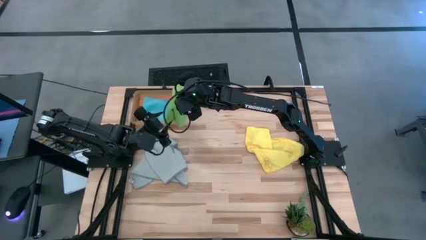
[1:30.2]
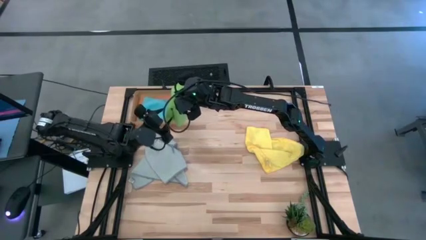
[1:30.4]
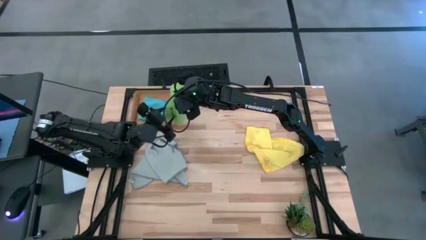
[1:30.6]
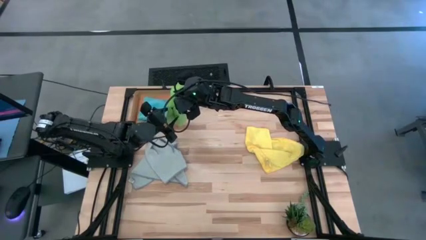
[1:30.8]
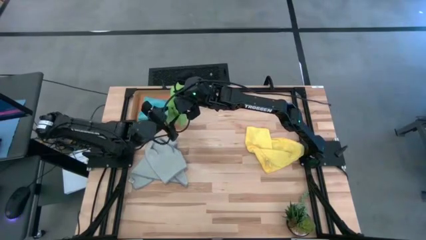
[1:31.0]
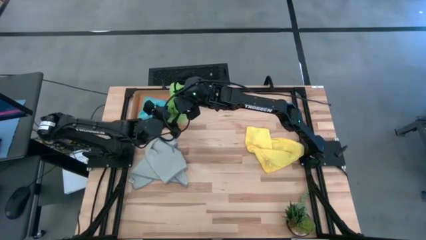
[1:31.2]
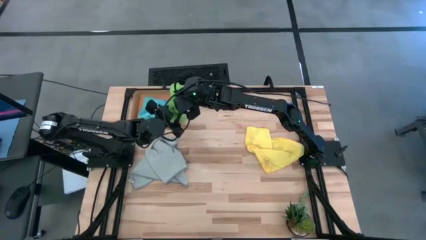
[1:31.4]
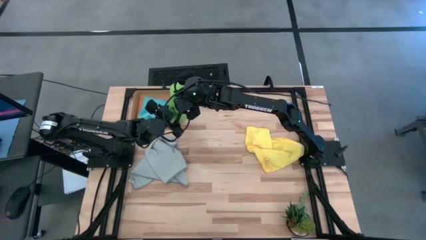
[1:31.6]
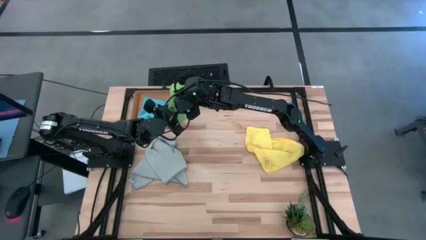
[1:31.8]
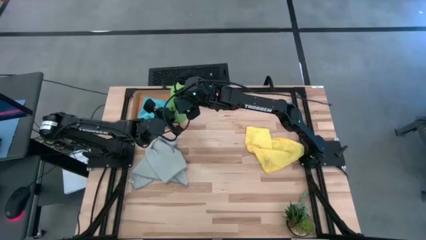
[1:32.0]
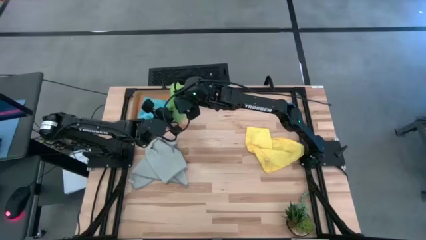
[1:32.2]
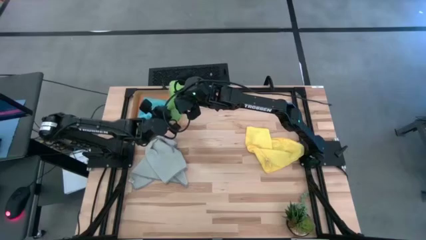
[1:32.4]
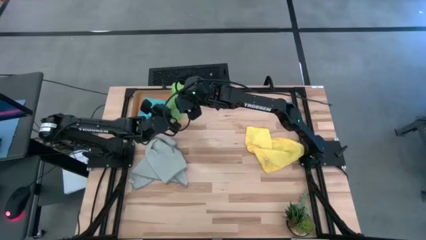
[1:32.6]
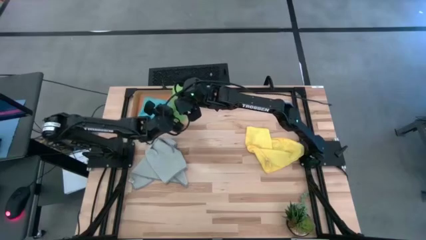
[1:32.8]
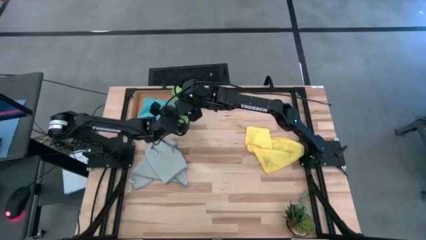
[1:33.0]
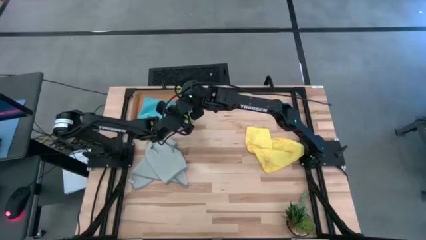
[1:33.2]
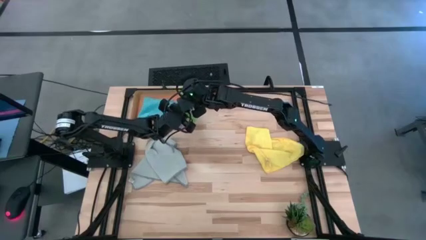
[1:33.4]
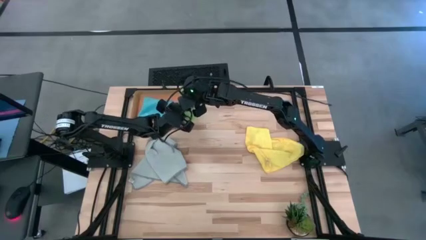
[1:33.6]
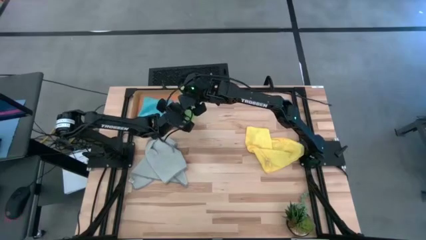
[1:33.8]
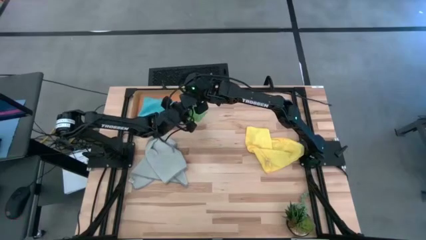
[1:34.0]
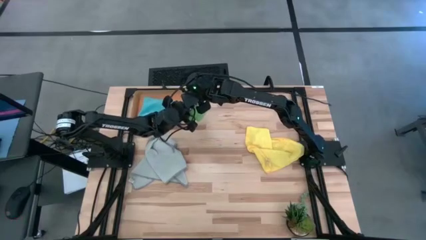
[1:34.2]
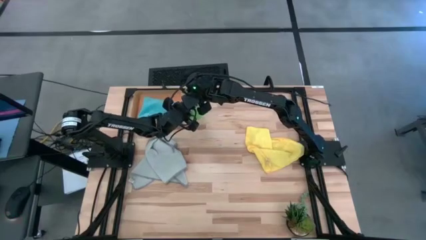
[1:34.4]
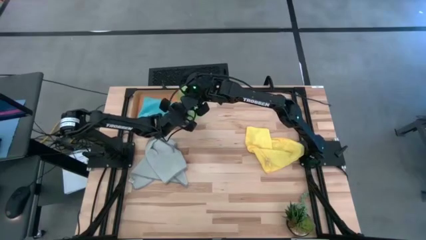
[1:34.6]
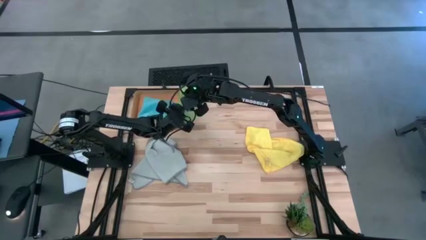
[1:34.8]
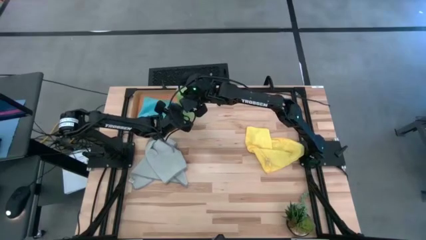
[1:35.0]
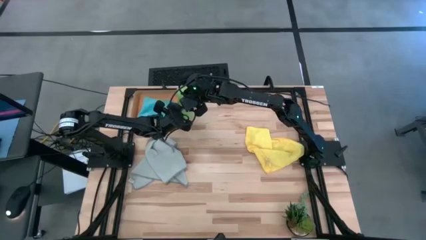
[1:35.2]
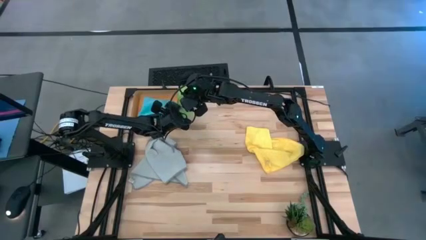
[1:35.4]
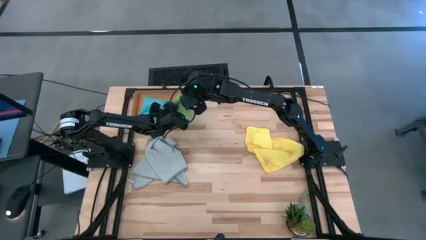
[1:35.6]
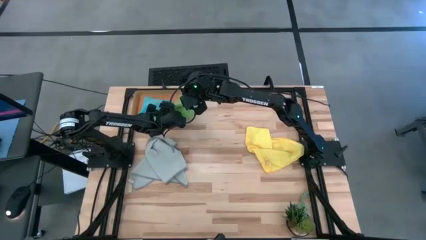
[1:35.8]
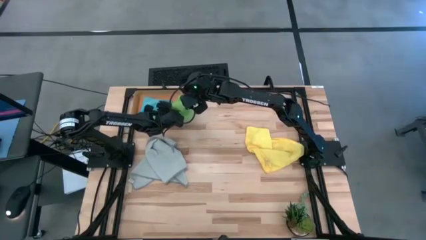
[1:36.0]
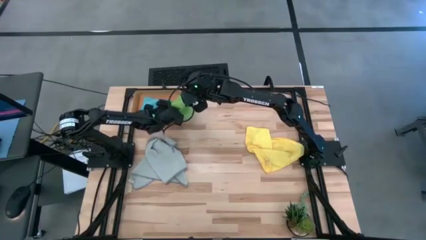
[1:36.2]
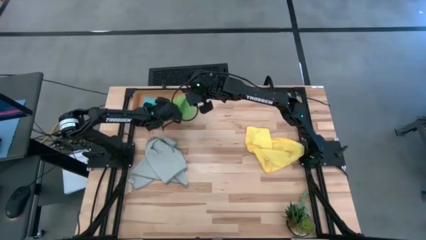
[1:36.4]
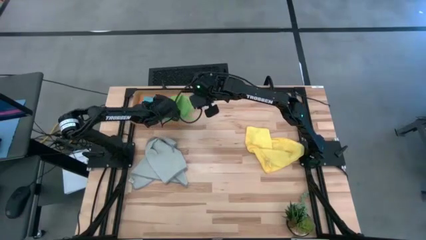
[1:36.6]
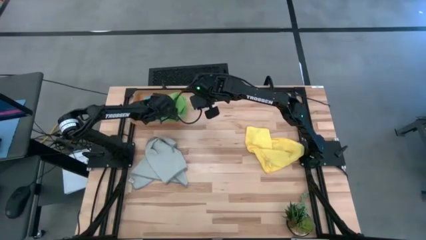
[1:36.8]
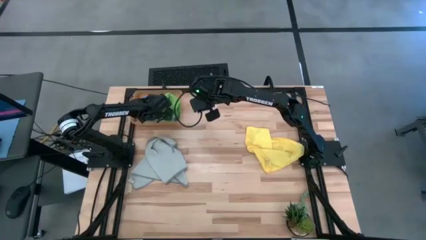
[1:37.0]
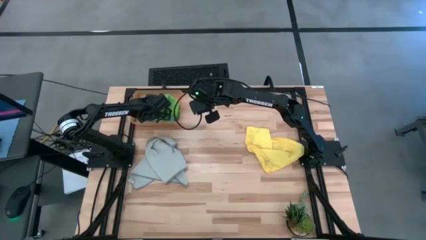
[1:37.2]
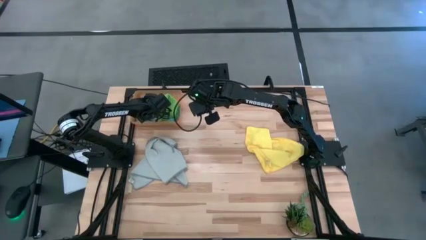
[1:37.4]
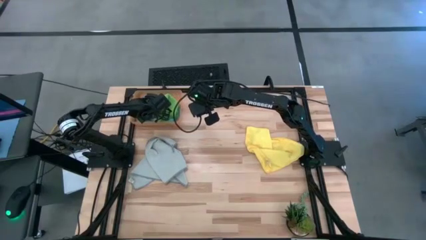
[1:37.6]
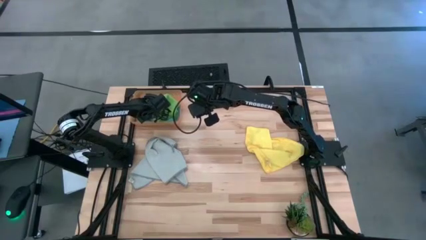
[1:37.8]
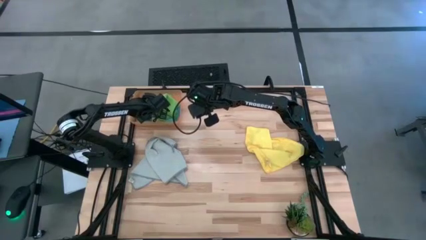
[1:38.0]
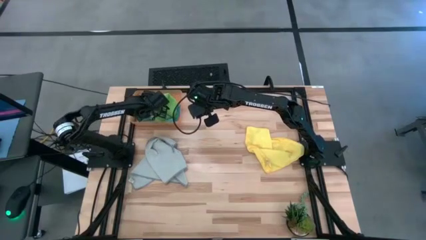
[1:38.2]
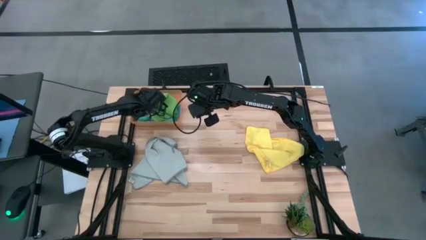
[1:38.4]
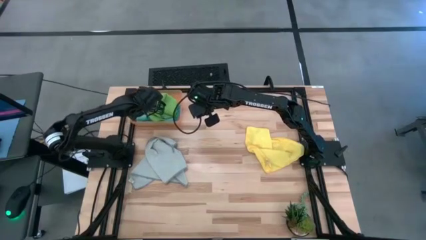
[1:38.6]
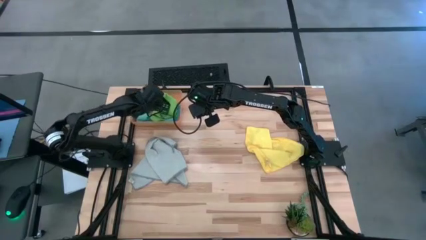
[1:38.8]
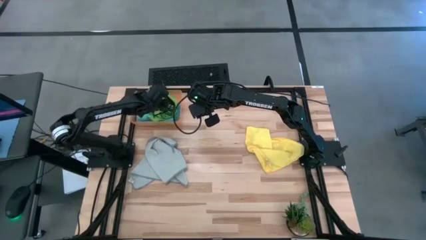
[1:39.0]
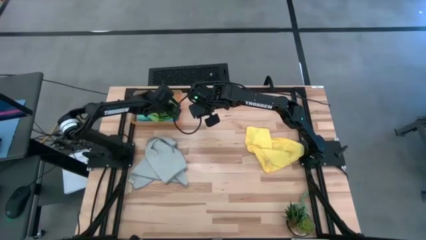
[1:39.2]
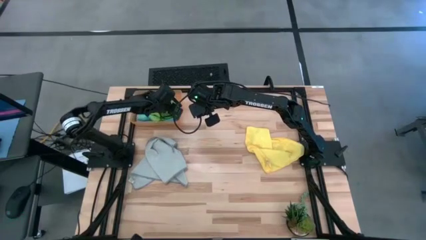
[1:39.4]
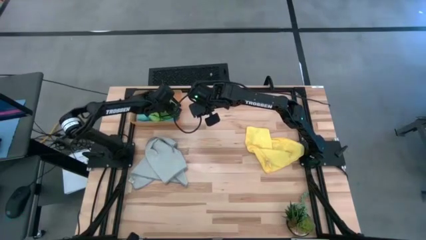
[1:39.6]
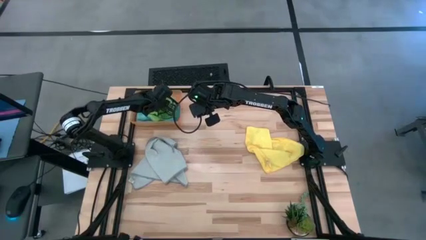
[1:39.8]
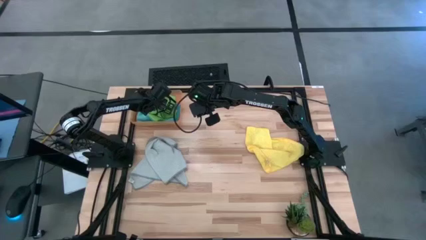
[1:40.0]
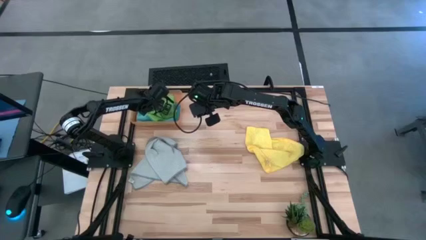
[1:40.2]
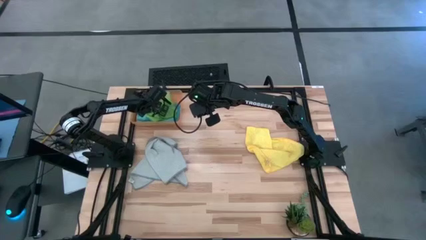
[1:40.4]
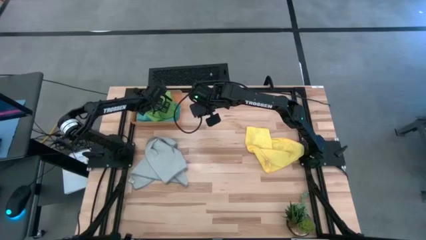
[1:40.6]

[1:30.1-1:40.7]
Task: Fold microfiber towels
Put the green microfiber cloth into the orange bin

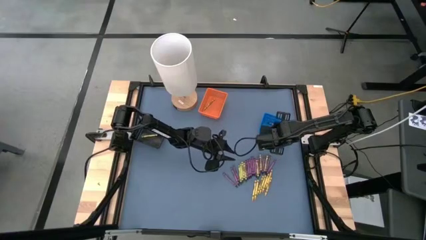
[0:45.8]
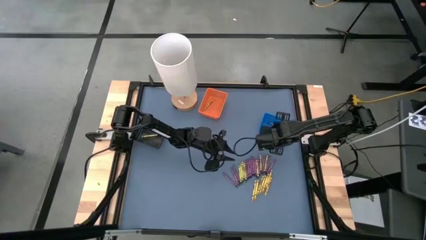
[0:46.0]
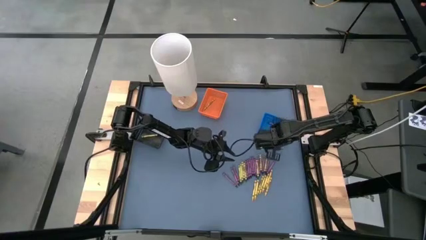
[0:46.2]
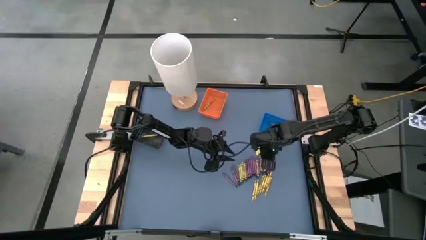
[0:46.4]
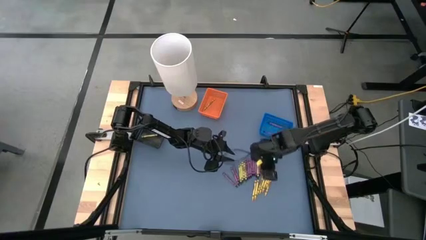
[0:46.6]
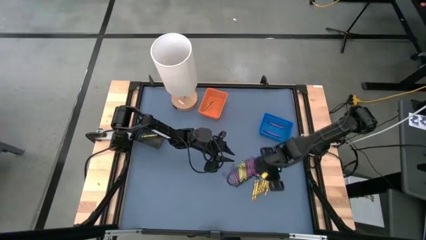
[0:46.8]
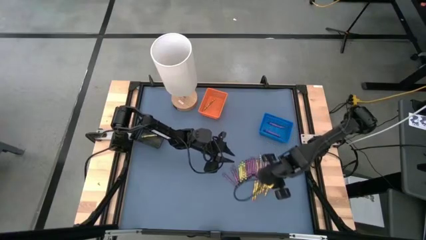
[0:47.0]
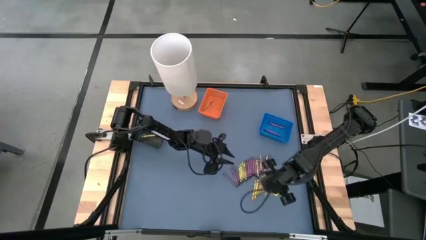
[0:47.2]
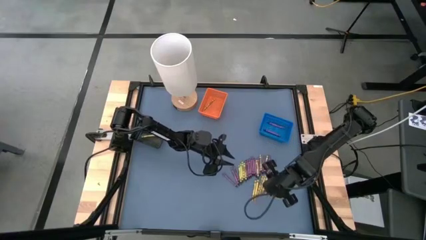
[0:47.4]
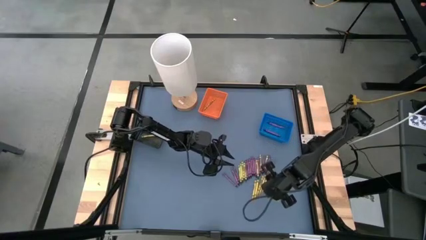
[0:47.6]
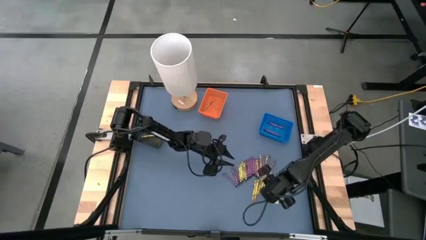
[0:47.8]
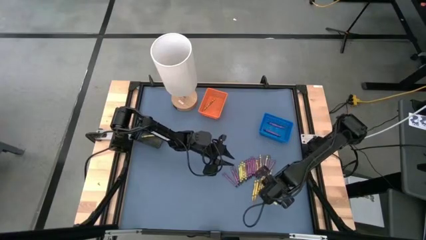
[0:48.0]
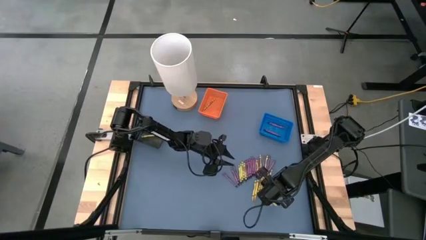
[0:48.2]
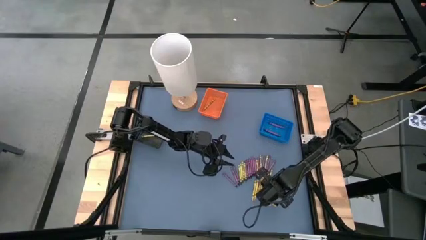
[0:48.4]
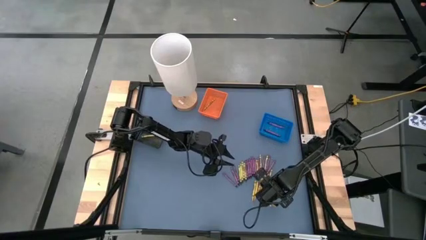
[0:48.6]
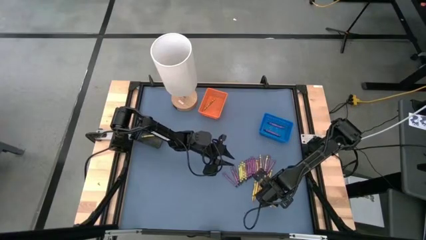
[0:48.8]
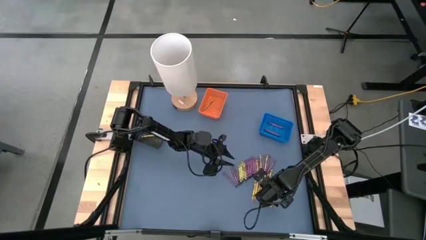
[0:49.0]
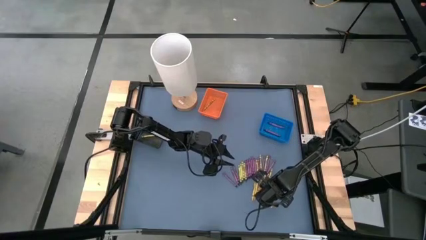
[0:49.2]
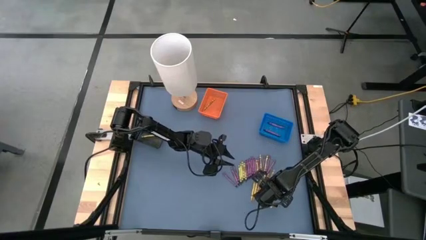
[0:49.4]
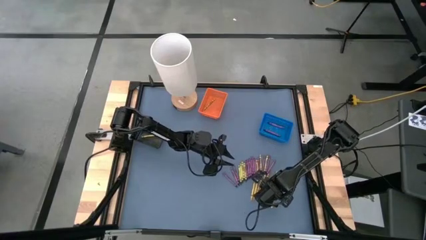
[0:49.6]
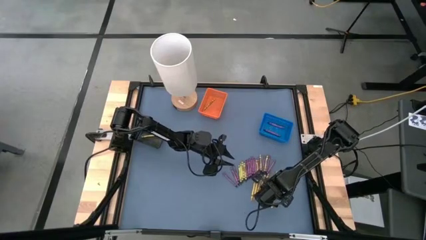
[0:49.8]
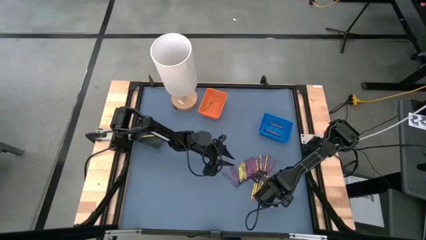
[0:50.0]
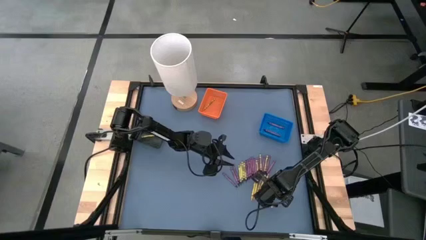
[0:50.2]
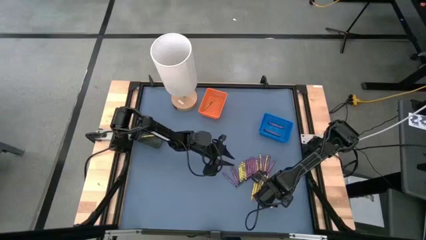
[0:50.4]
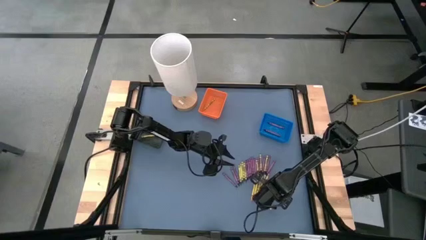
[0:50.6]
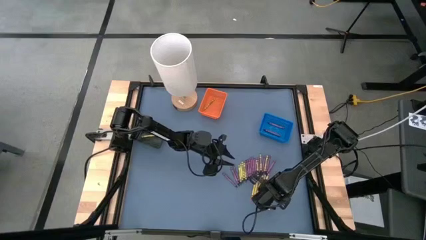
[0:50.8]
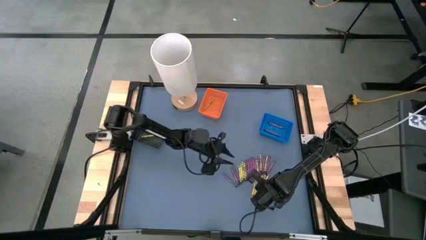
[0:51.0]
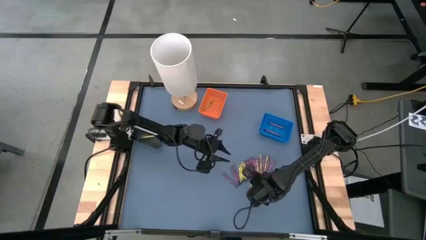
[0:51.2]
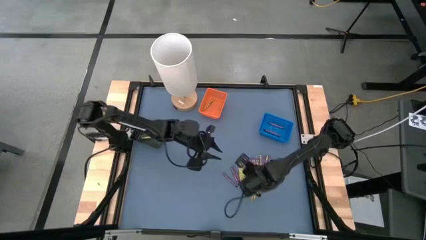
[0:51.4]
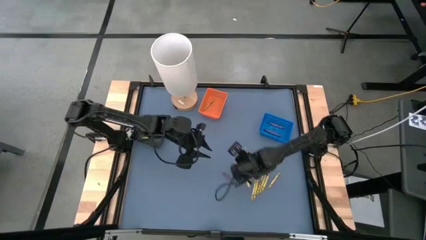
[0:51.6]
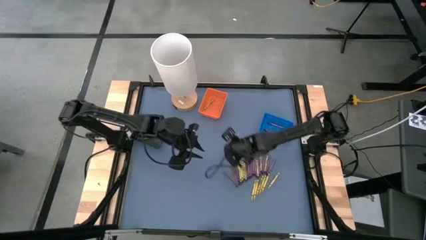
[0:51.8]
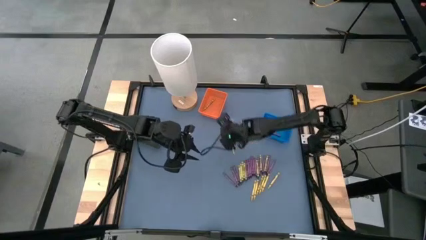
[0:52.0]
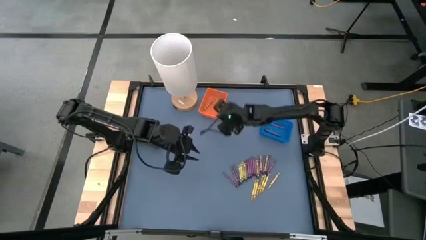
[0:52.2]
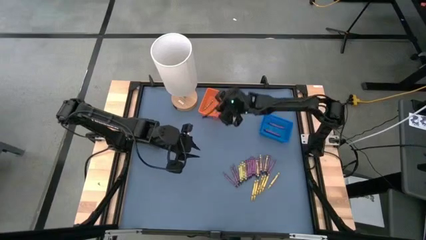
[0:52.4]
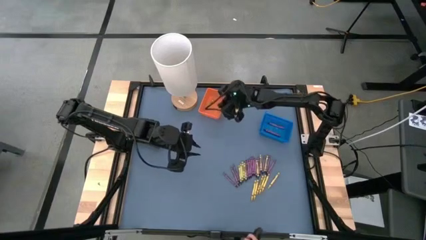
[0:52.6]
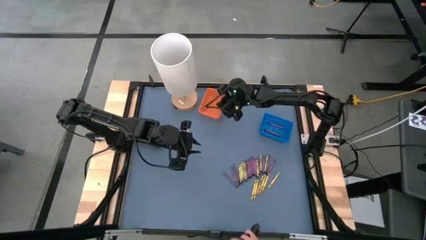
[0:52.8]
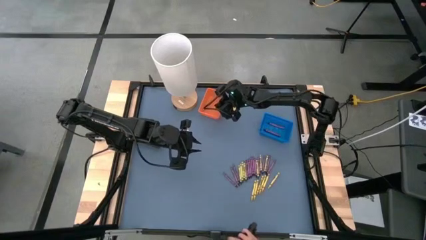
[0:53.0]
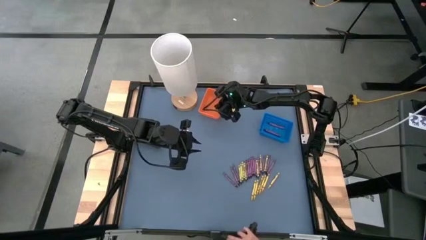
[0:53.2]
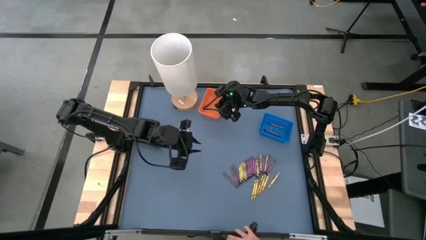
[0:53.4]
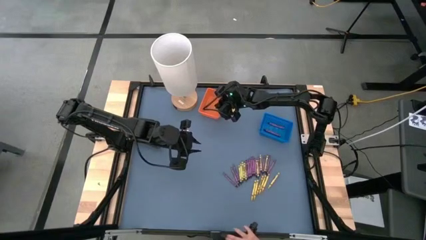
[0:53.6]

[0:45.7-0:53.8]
Task: Sort crayons
Put the yellow crayon into the orange basket
